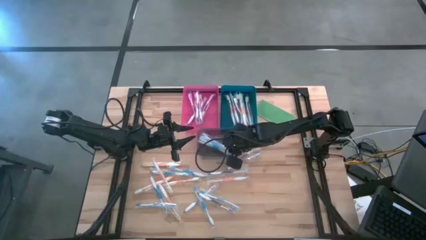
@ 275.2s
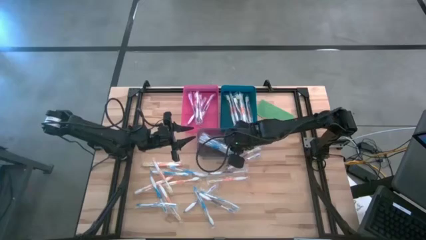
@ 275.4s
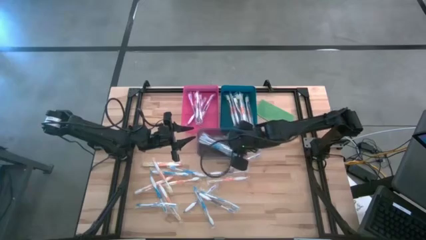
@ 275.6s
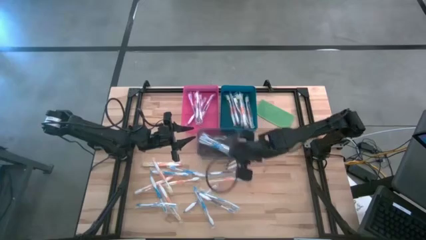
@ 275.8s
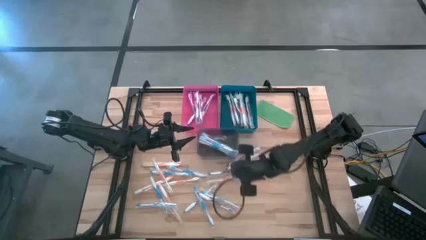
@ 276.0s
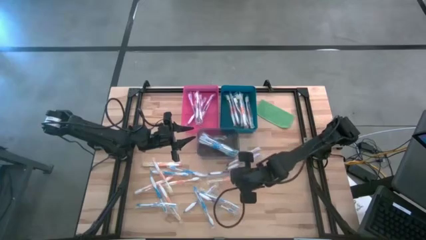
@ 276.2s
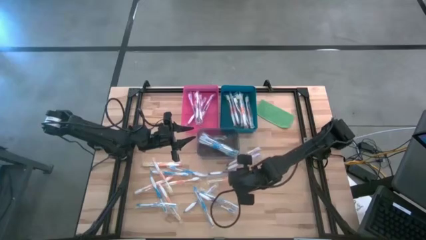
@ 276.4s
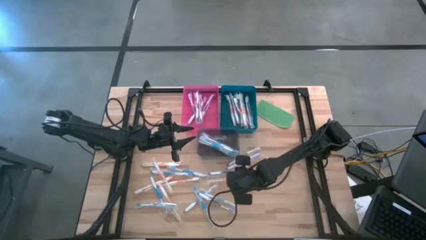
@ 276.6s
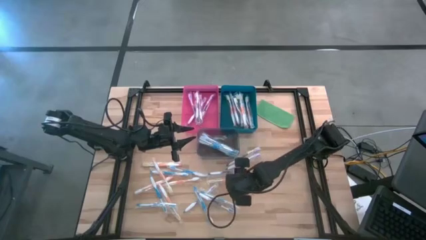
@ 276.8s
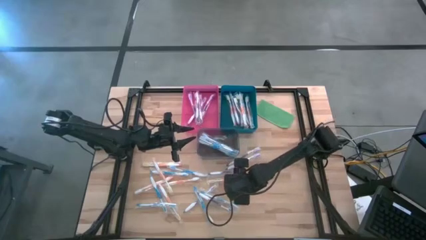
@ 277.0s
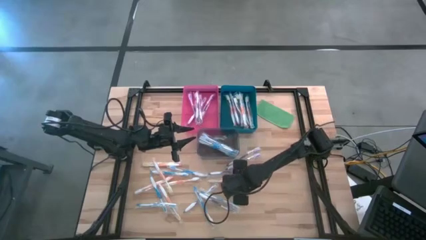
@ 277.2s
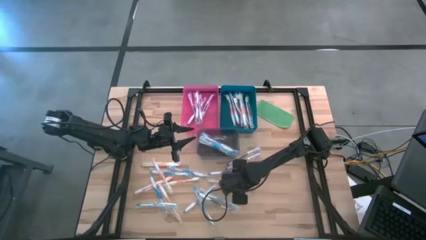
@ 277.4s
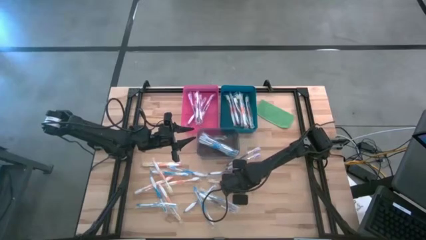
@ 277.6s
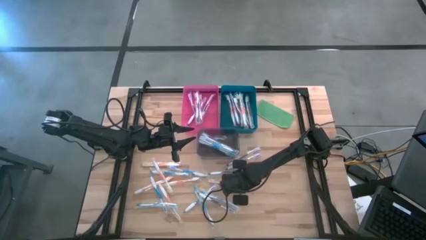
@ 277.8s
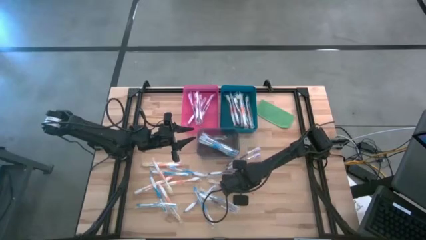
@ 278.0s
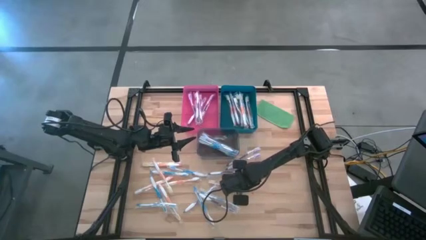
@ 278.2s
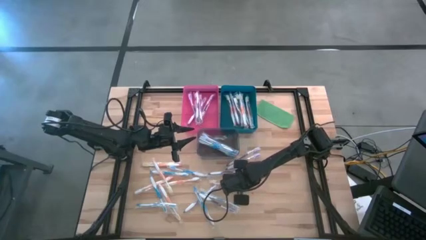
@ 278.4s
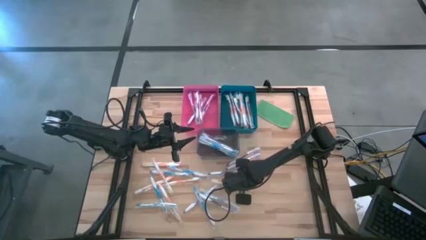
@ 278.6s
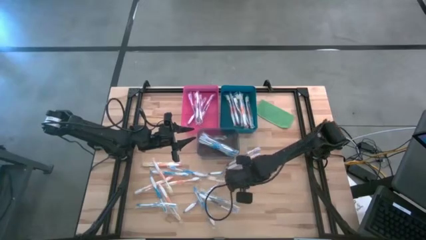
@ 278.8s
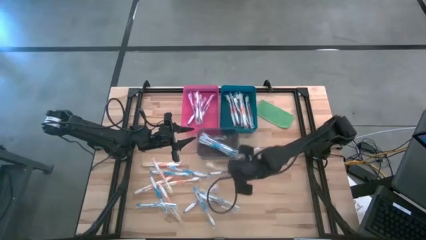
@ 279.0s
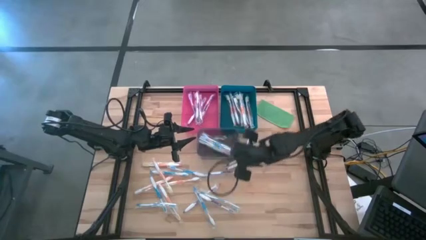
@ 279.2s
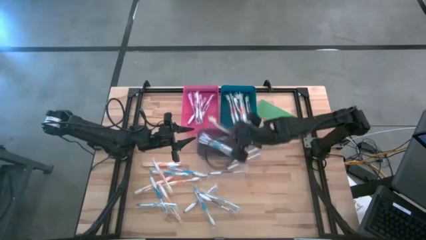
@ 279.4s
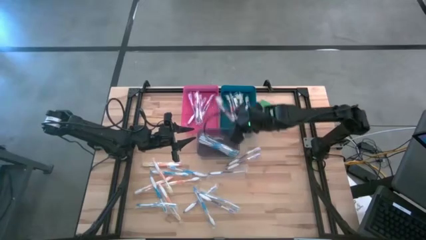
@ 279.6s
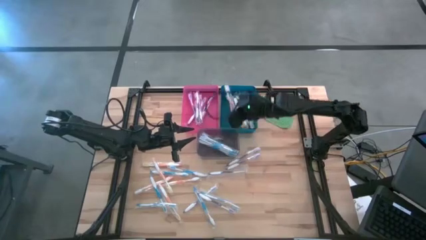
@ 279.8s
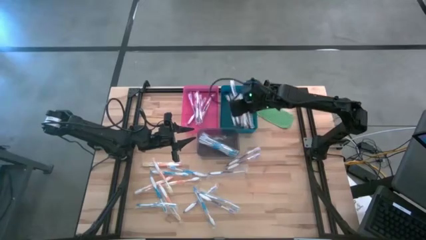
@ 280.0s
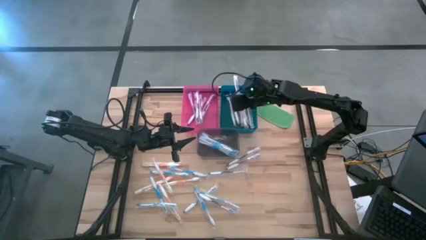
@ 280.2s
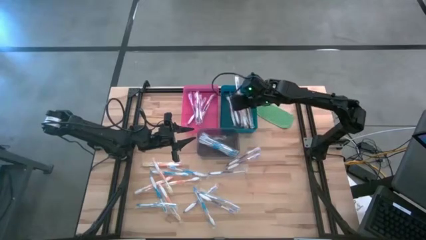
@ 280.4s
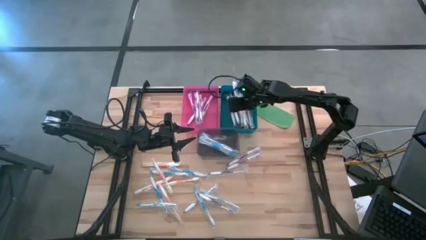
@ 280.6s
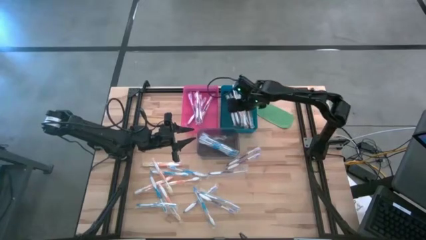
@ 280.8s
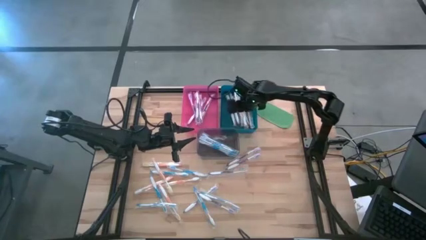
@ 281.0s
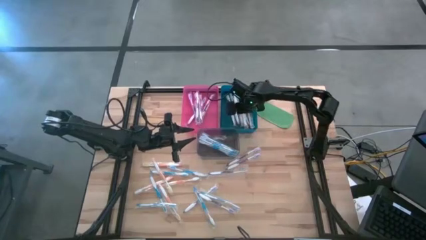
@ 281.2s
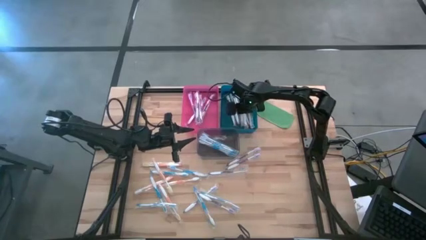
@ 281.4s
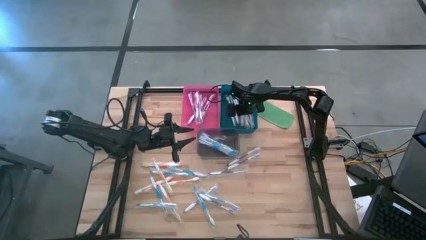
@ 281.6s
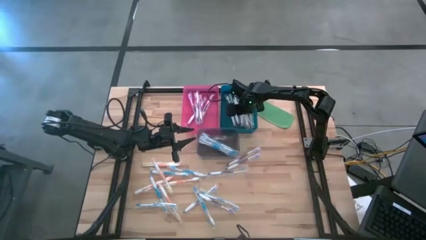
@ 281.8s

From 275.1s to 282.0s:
Task: Pick & Place Toothbrushes
Put the orange toothbrush into the blue bin

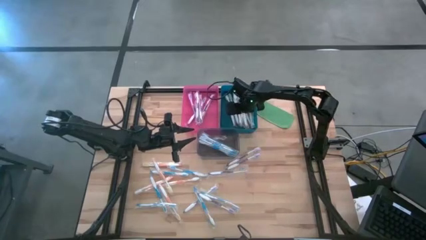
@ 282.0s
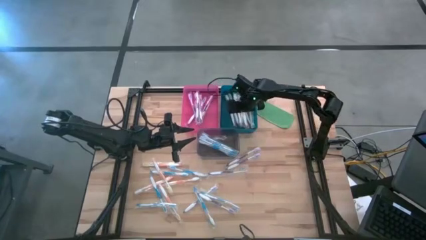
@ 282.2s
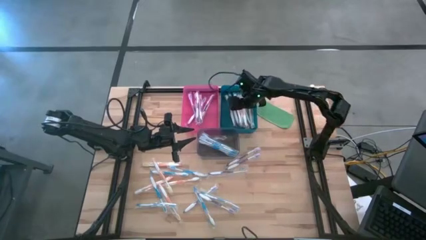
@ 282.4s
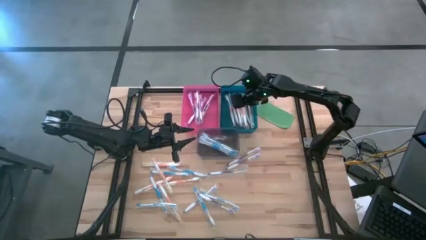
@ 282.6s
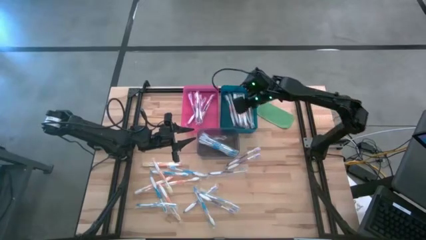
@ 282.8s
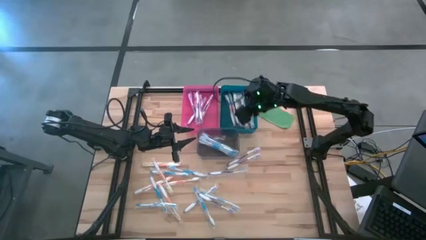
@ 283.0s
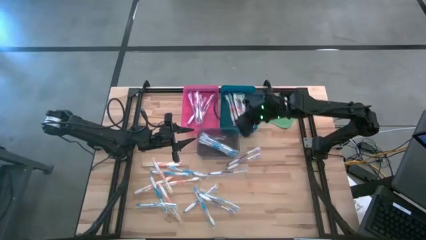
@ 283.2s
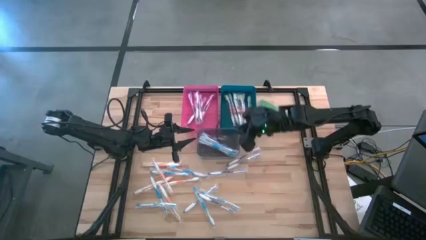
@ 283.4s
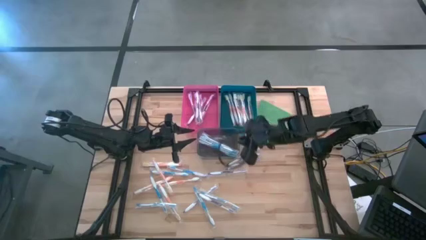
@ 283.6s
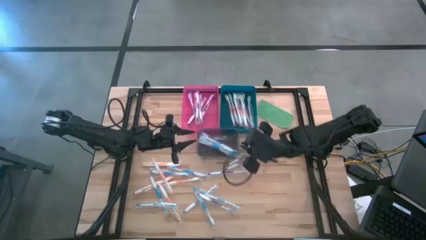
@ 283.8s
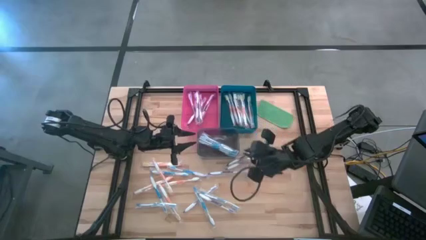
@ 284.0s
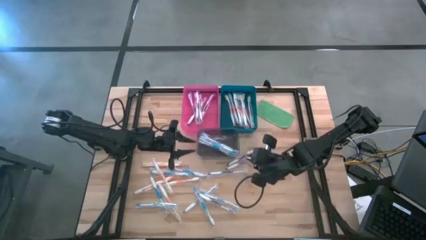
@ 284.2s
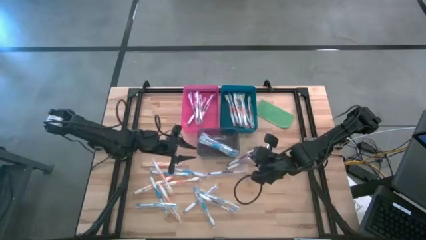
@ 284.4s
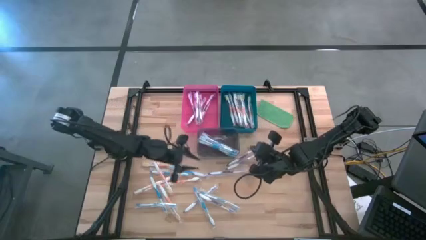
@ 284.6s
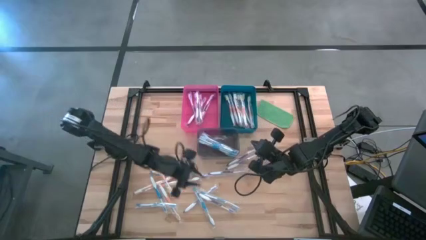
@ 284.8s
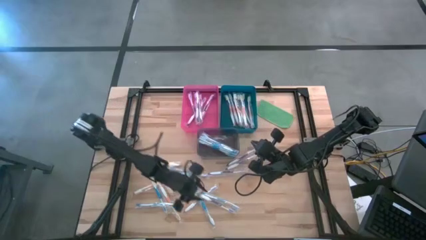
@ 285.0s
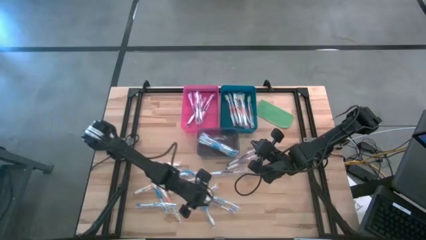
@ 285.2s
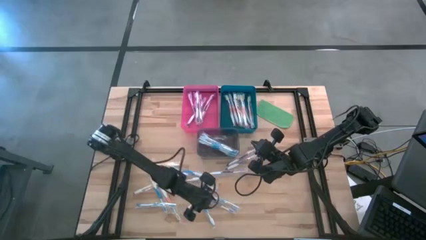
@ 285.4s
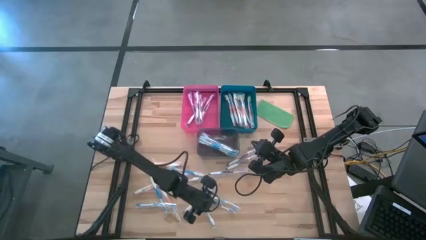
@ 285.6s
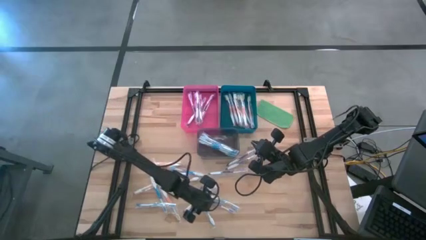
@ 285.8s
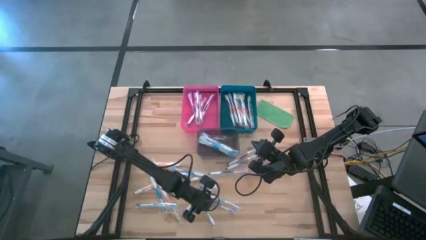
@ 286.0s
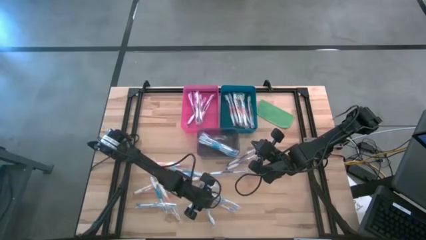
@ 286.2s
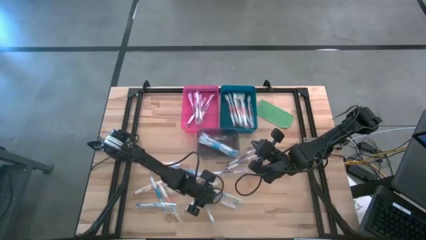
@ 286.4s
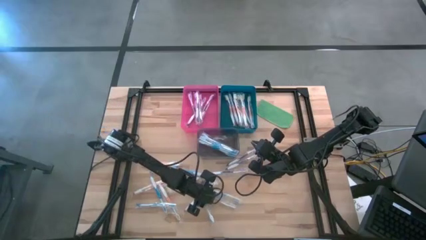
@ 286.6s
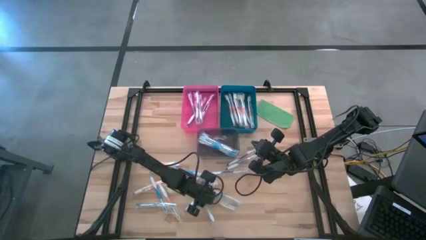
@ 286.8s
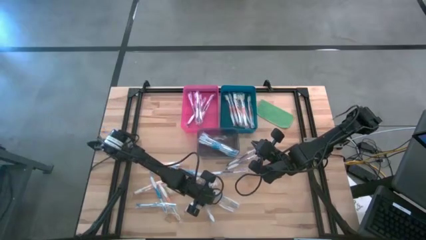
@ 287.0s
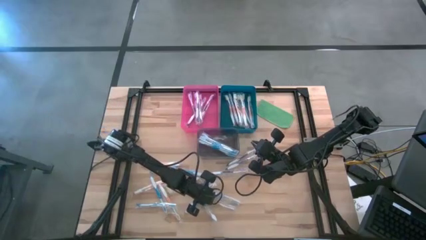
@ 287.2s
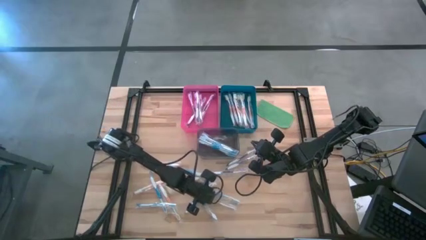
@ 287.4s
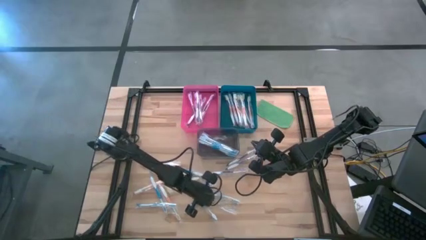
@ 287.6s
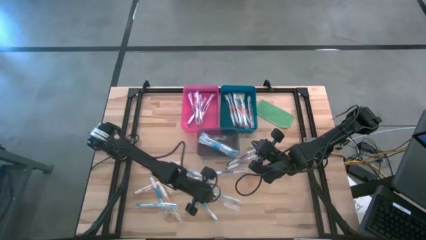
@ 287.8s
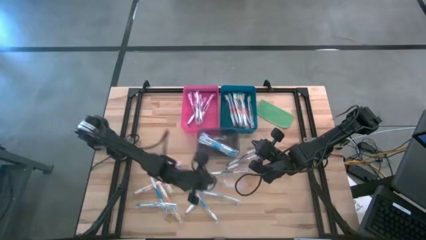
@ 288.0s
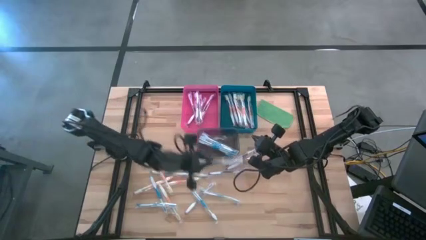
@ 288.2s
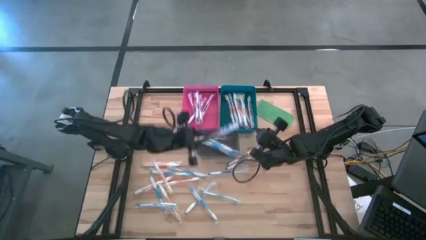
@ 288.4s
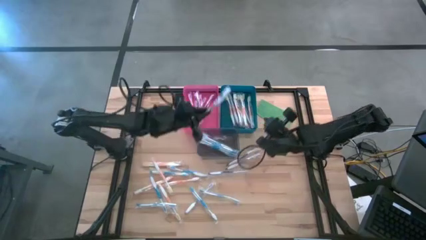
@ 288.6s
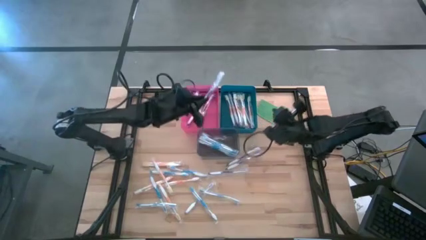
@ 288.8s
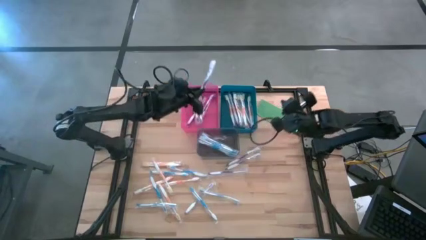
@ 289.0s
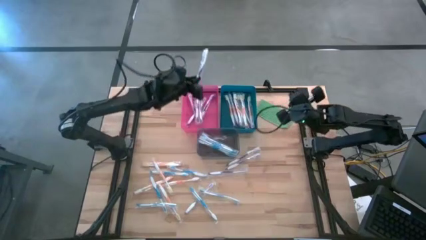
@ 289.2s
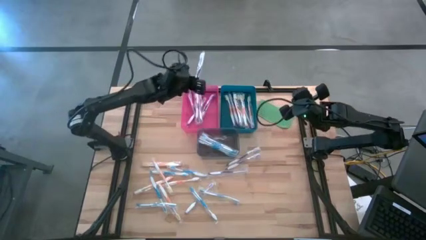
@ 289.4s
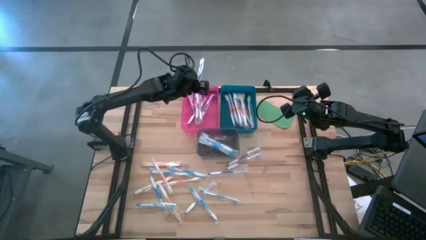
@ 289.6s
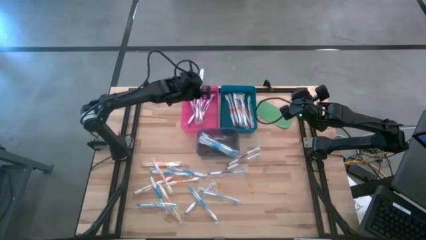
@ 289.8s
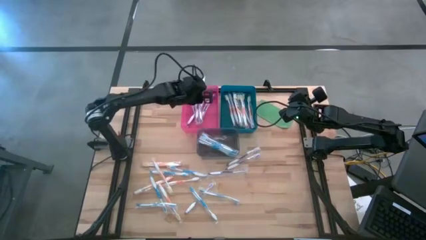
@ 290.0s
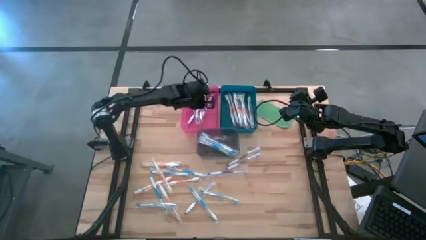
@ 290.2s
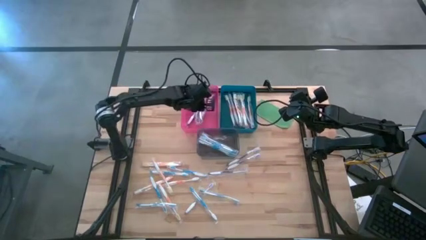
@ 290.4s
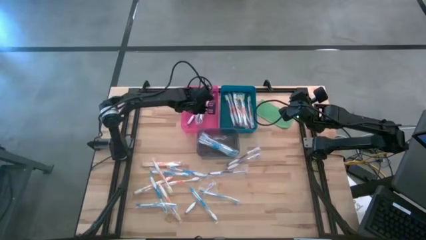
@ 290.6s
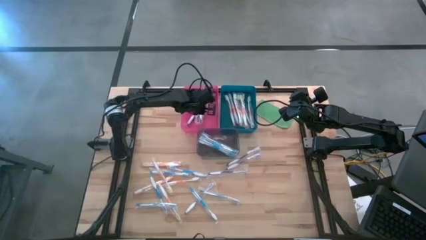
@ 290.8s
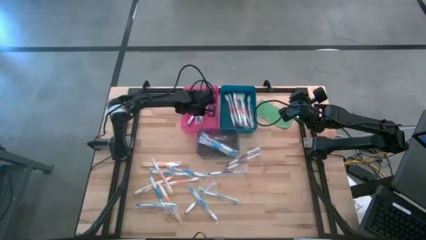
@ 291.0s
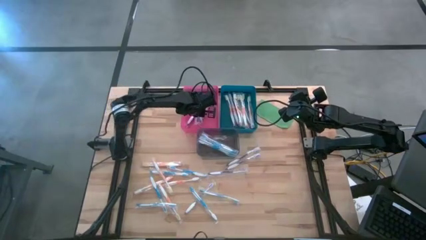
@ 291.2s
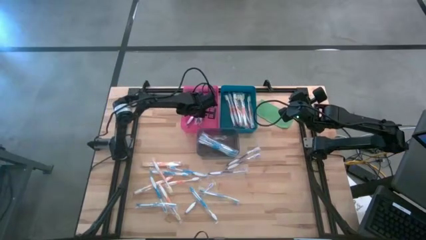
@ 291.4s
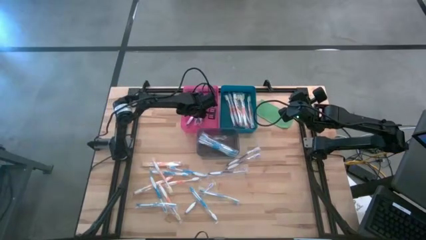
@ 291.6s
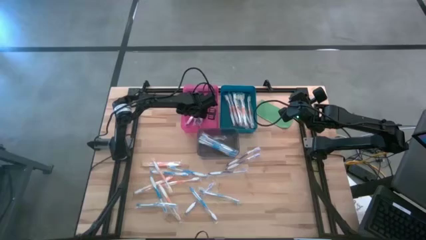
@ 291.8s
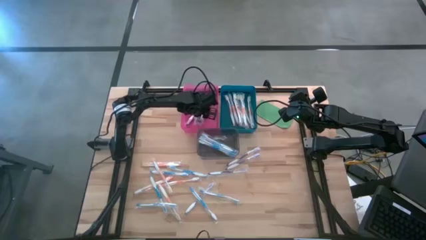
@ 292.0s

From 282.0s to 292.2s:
Put the purple toothbrush into the pink bin
